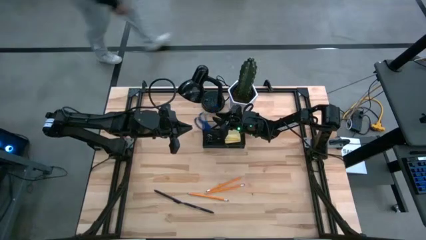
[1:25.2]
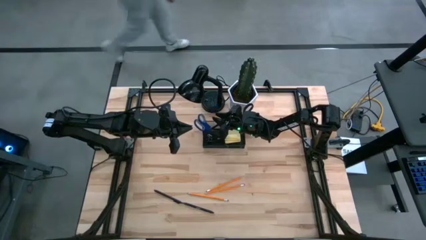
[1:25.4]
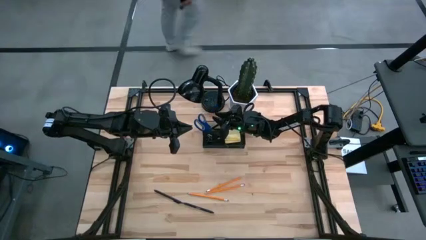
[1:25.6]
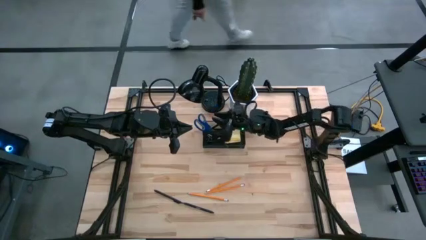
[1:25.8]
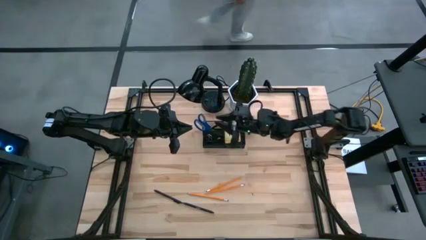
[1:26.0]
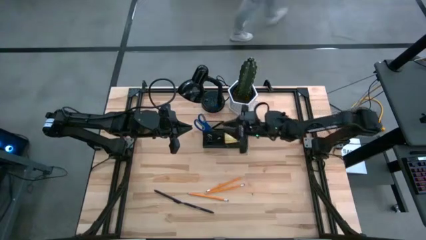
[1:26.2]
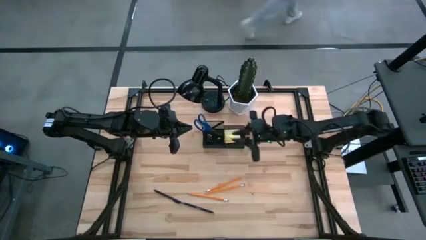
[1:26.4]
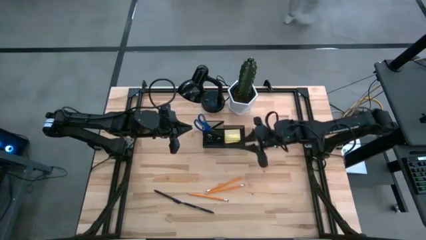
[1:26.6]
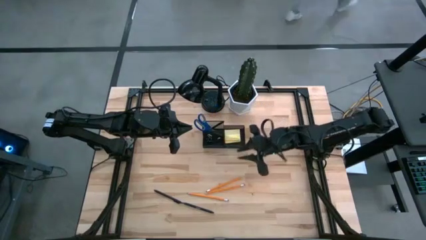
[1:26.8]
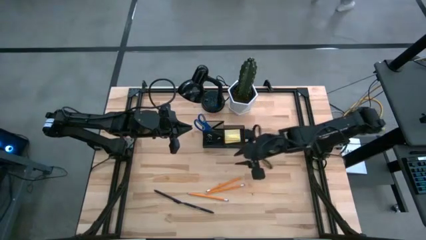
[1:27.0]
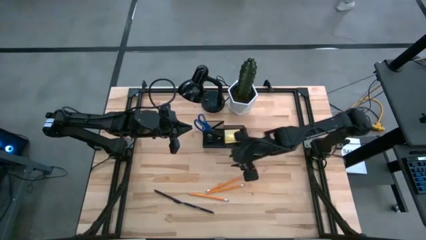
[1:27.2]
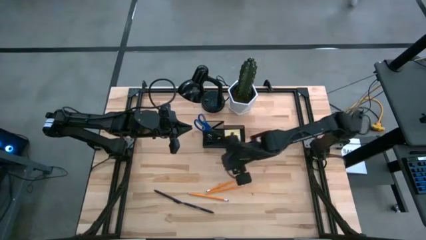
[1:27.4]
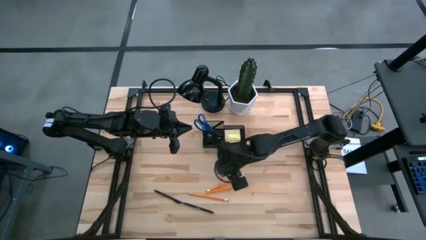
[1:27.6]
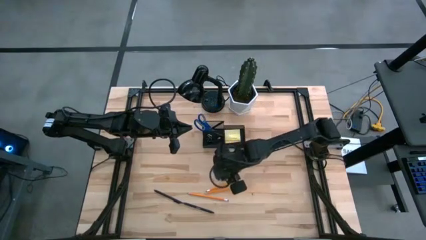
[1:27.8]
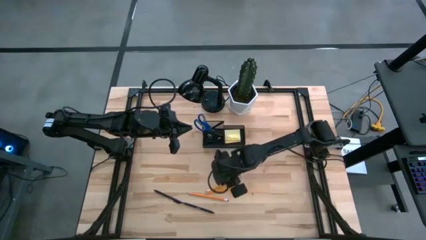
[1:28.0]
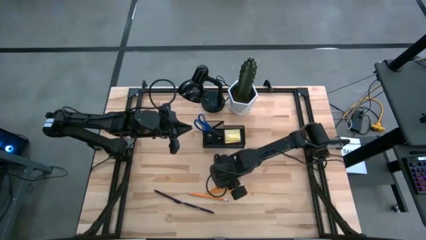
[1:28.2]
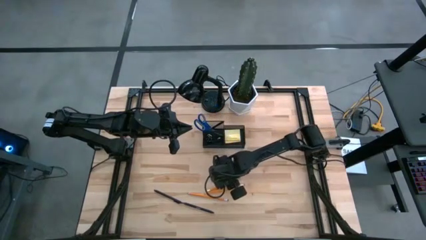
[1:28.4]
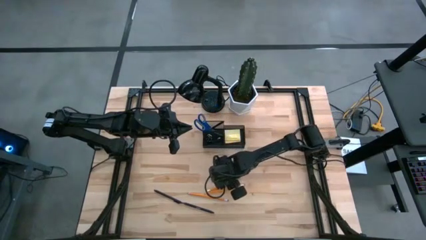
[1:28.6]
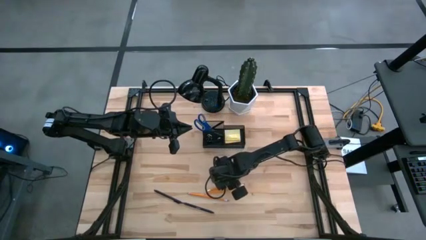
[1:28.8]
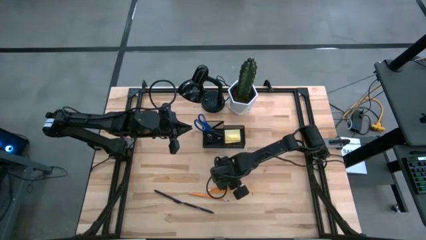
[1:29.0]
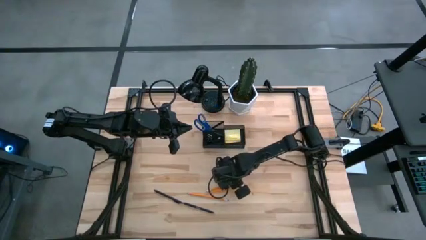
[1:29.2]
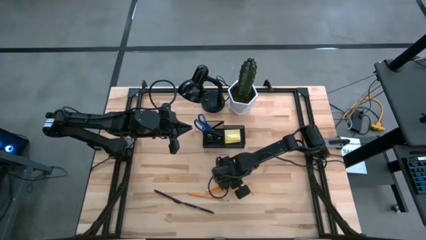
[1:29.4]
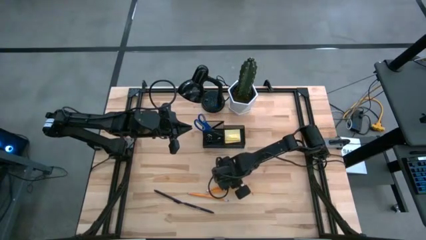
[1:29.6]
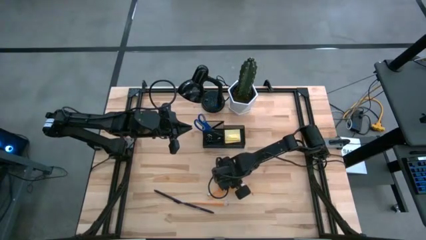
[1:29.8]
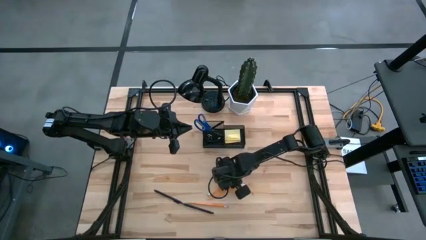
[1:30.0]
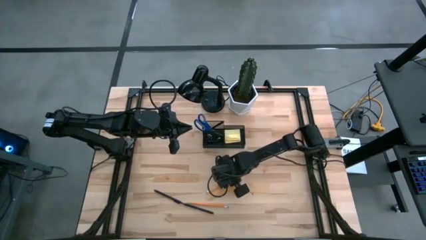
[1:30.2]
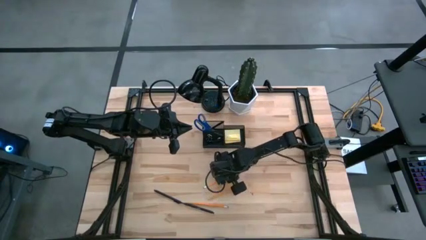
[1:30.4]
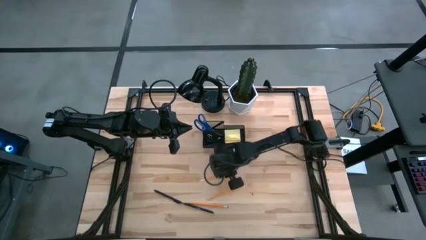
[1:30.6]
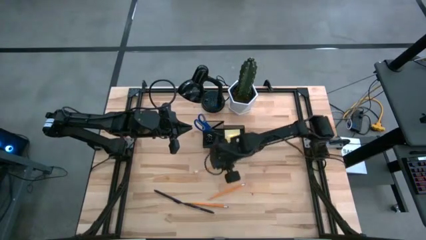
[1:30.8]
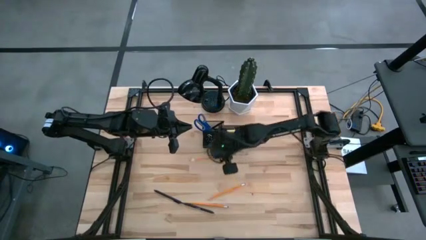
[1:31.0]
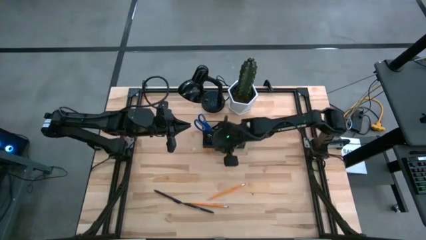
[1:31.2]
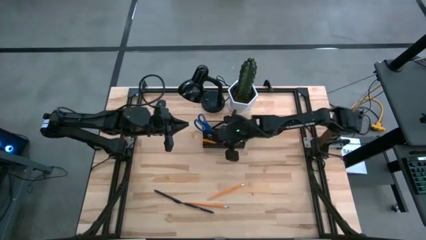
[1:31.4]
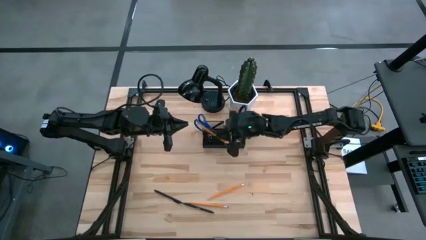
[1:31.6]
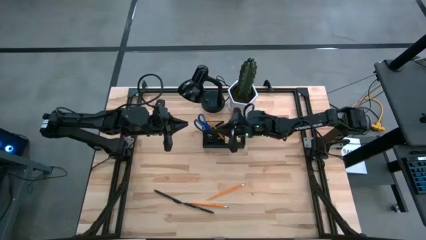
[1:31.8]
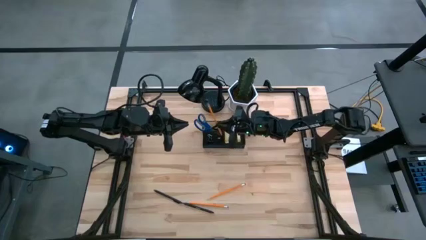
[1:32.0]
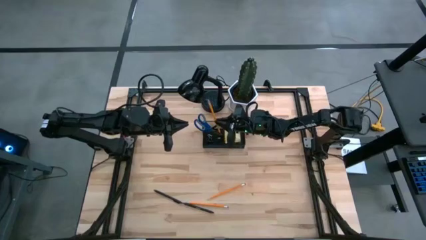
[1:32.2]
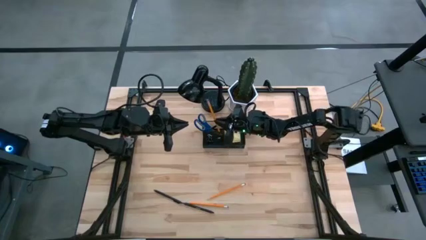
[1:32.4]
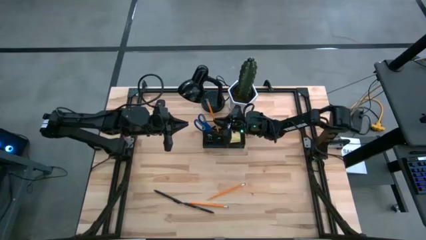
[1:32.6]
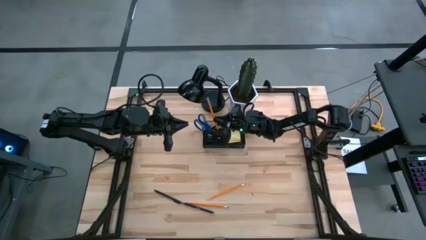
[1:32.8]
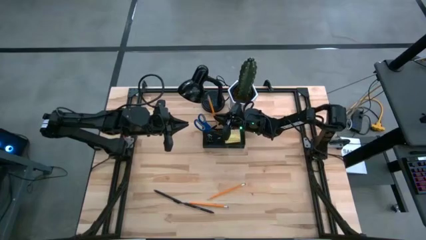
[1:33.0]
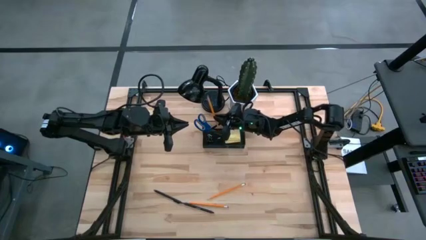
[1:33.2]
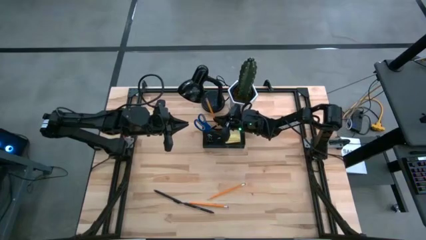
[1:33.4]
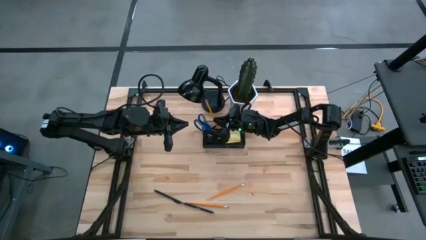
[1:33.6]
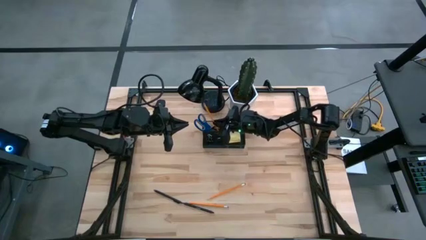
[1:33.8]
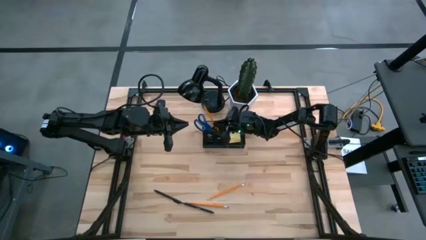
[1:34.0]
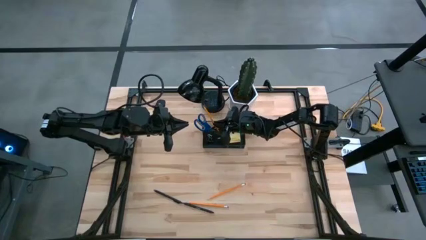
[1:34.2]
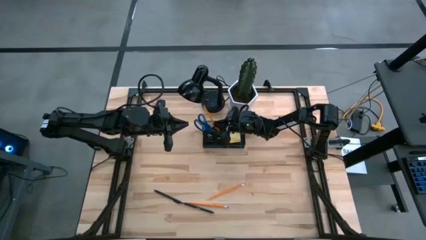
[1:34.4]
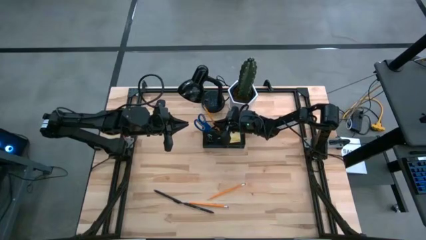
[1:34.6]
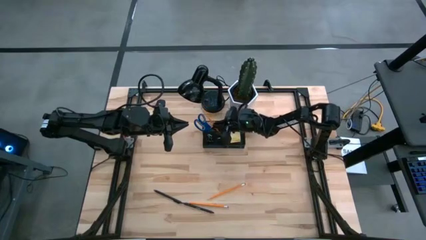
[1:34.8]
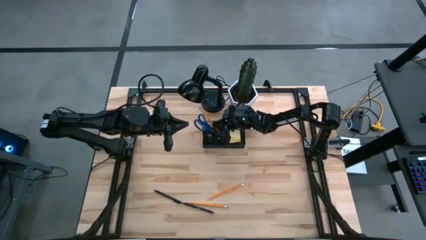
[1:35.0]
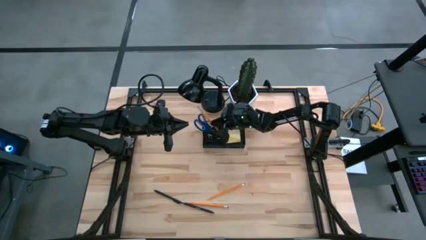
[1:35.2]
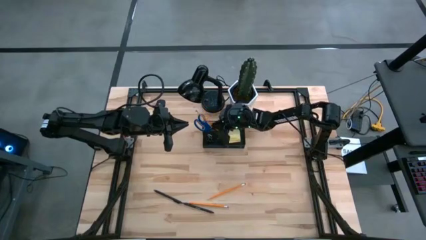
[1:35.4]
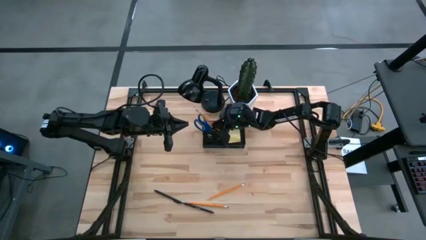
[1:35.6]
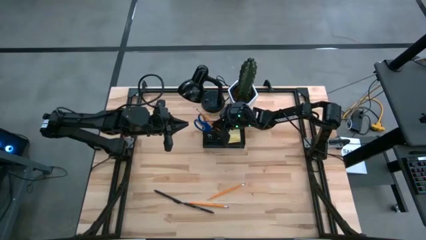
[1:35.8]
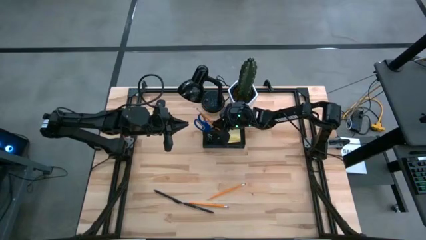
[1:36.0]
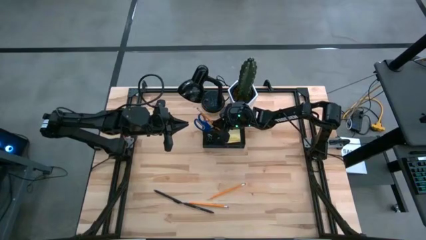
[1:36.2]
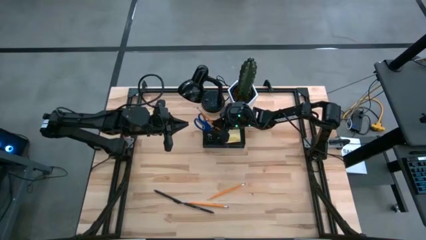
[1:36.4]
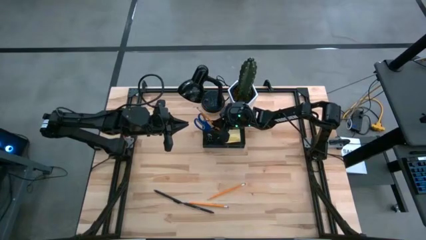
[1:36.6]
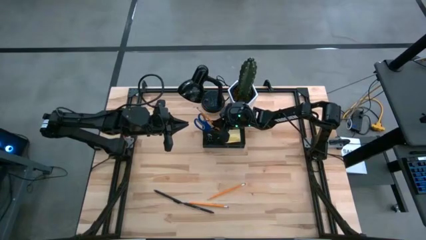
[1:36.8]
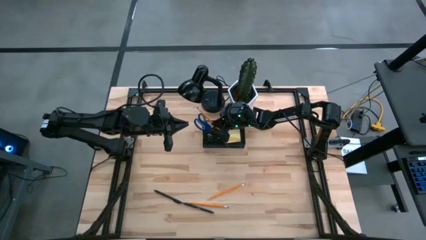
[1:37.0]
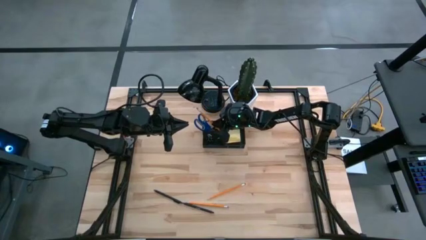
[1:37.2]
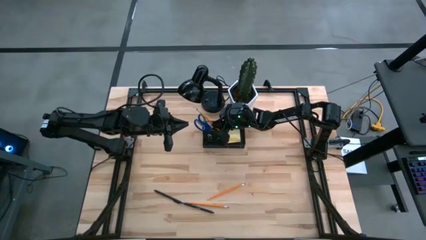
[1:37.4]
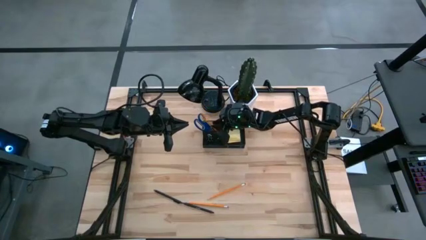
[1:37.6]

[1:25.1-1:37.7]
Task: Pick and place office supplies into organizer
Put the top yellow pencil into the black desk organizer
